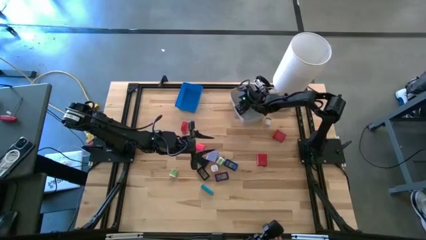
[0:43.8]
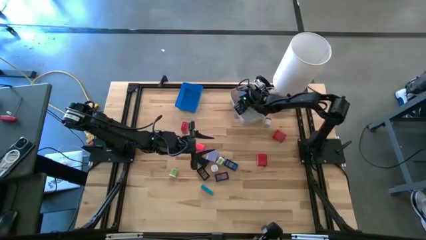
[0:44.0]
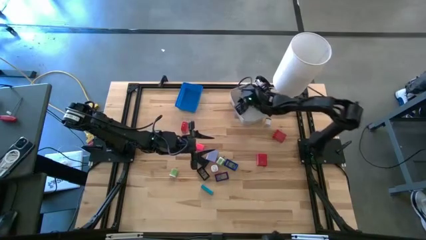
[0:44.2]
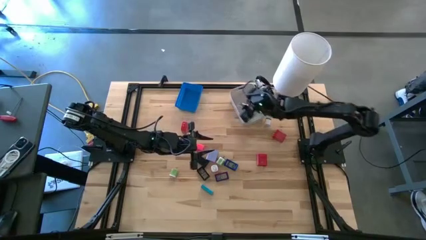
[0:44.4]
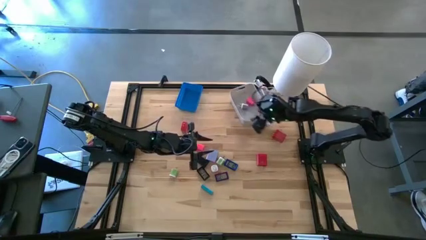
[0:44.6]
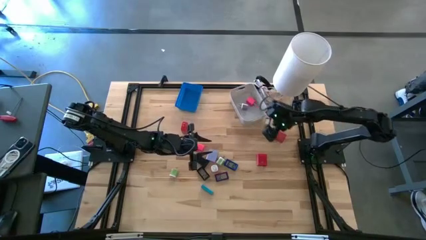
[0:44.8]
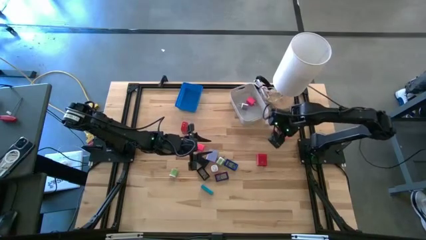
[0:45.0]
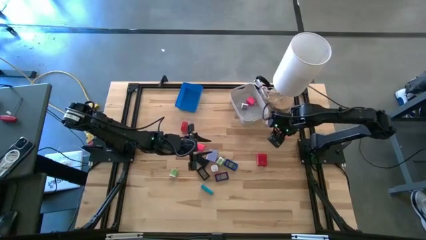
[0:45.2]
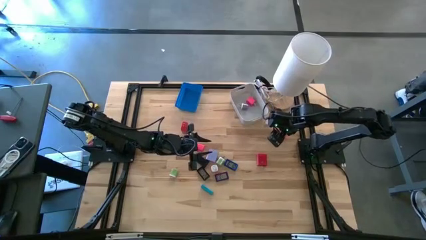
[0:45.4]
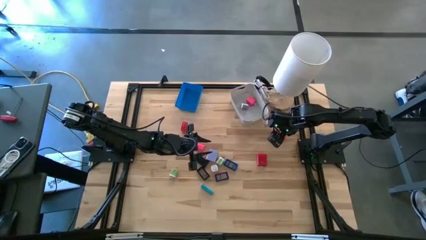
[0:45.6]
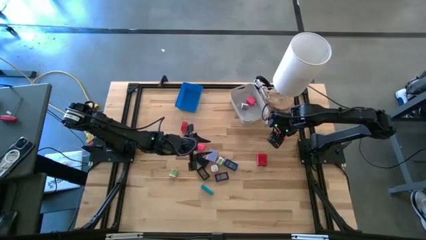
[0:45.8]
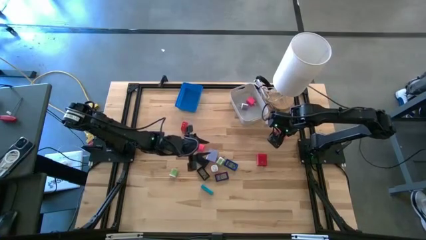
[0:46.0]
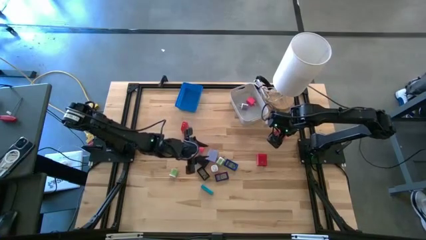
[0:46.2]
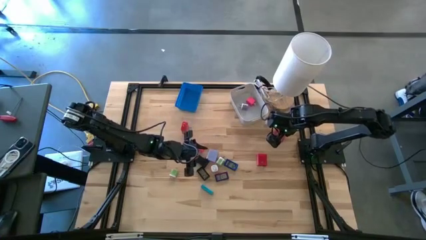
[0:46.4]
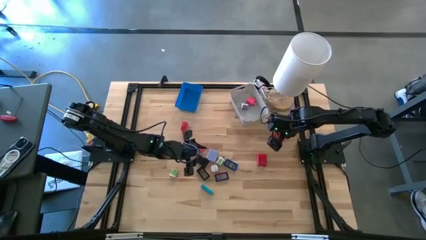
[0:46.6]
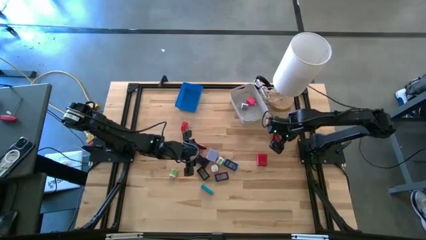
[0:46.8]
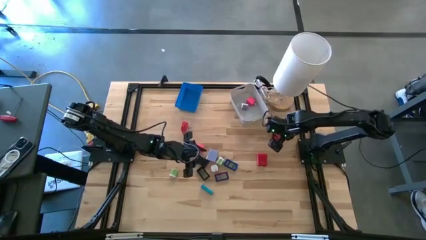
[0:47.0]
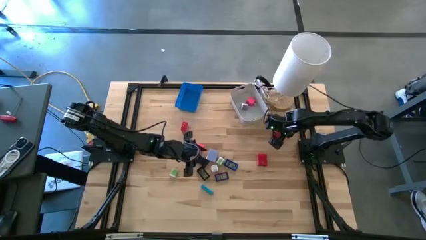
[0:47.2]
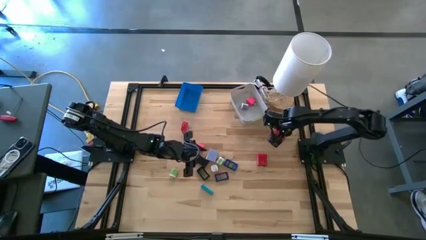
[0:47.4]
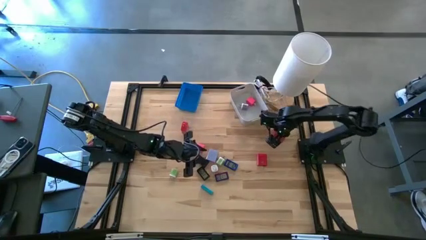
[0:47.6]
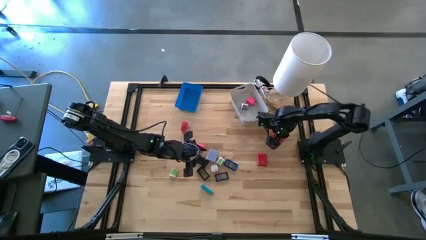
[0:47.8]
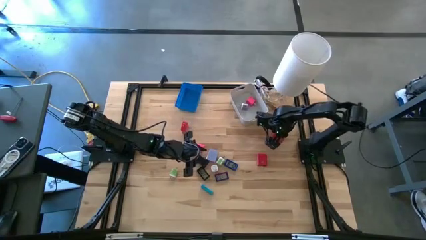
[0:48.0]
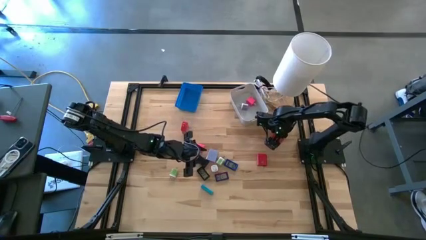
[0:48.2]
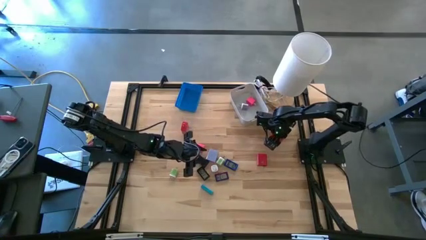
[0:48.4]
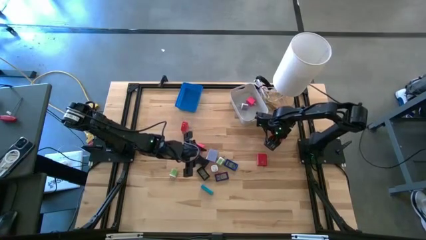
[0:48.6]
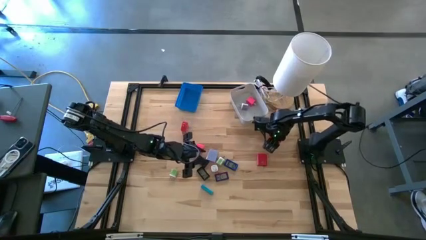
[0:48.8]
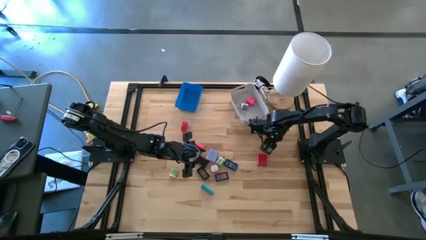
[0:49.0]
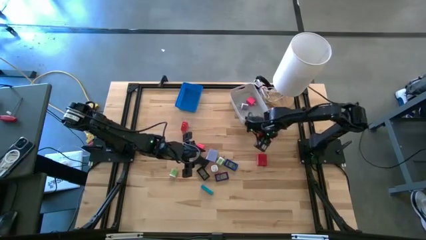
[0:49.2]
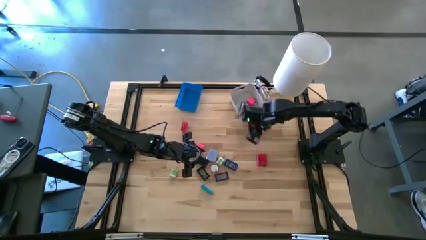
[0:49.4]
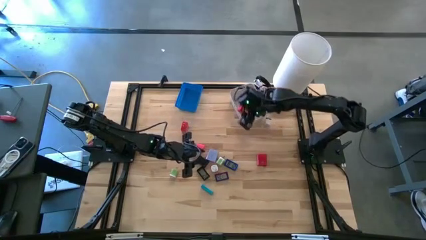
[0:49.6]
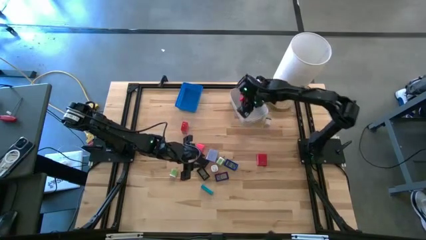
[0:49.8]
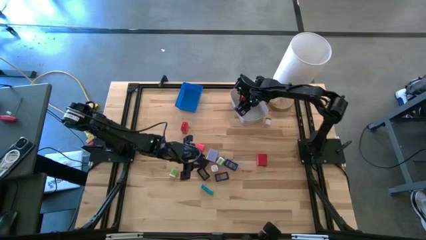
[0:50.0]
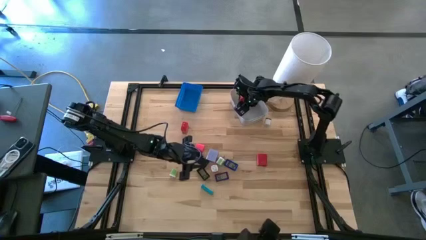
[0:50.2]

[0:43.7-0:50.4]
Task: Pick & Place Office items
Put the top right red charger adapter into the white bin

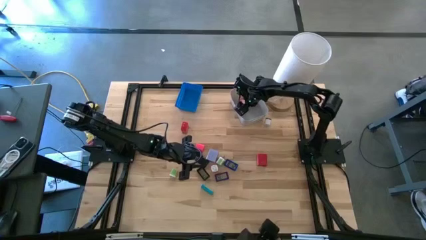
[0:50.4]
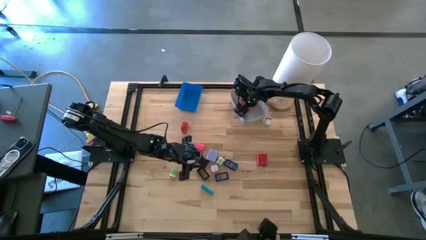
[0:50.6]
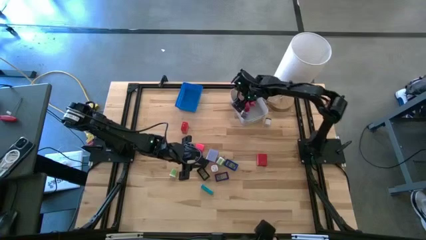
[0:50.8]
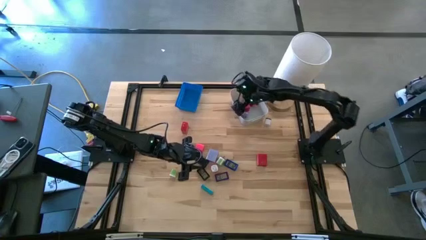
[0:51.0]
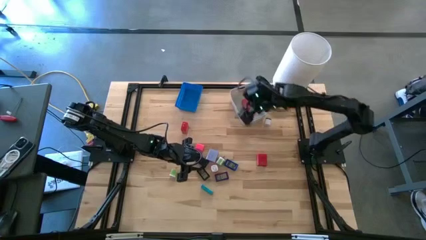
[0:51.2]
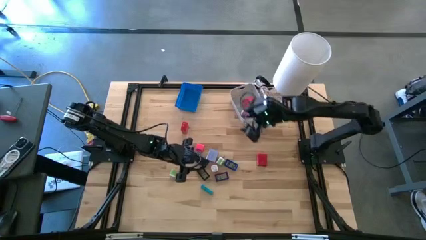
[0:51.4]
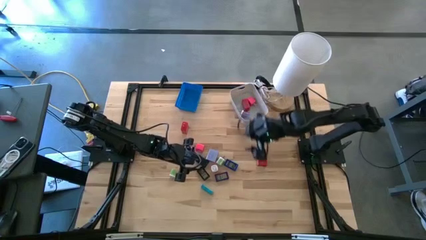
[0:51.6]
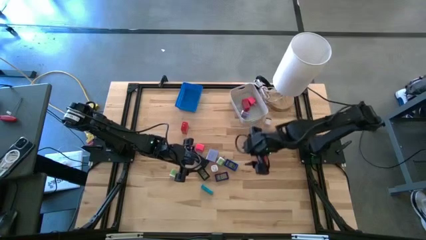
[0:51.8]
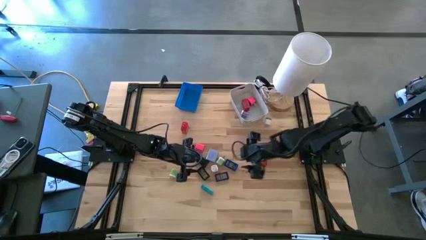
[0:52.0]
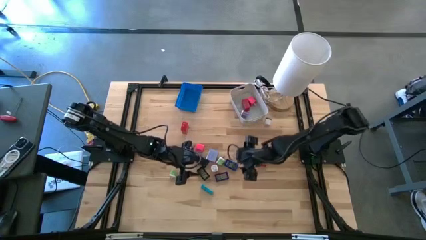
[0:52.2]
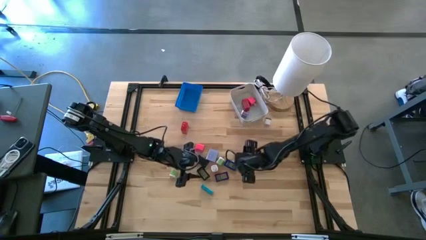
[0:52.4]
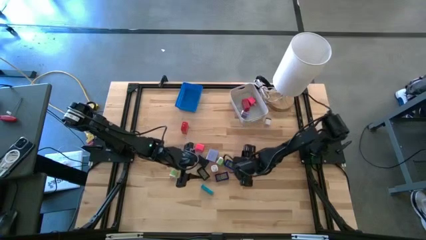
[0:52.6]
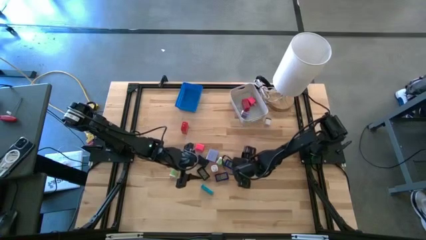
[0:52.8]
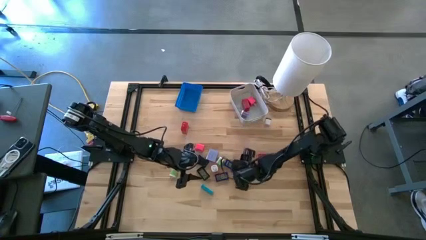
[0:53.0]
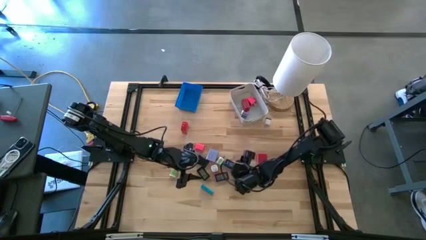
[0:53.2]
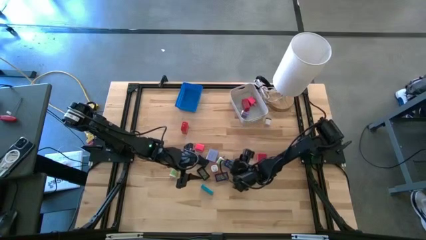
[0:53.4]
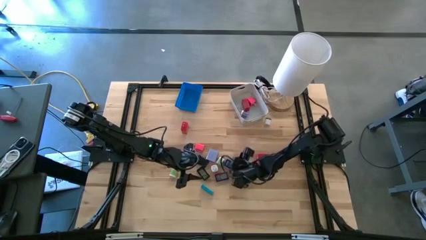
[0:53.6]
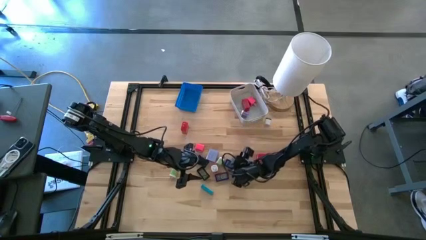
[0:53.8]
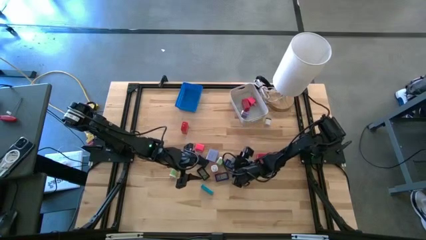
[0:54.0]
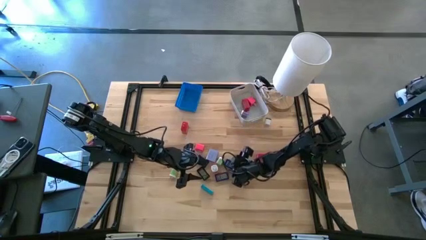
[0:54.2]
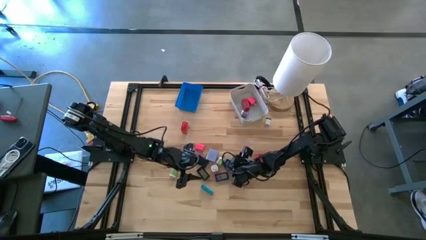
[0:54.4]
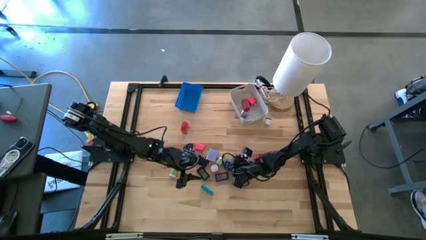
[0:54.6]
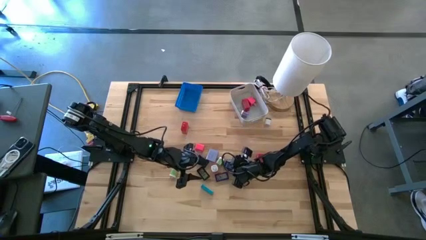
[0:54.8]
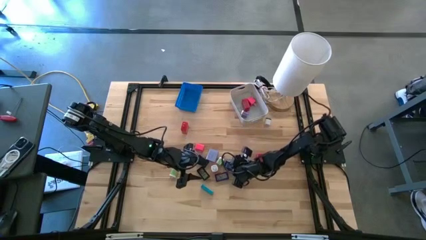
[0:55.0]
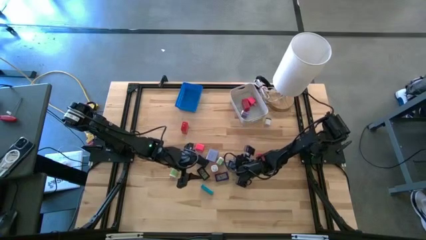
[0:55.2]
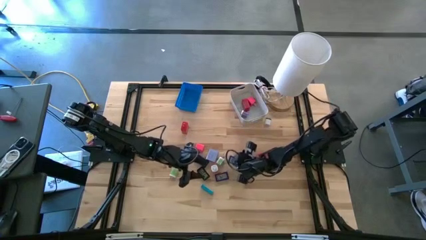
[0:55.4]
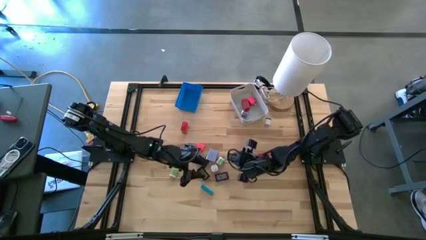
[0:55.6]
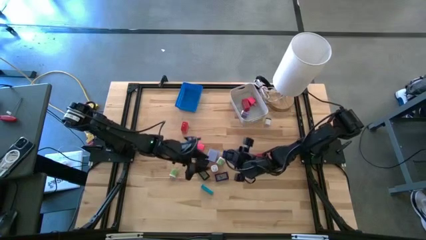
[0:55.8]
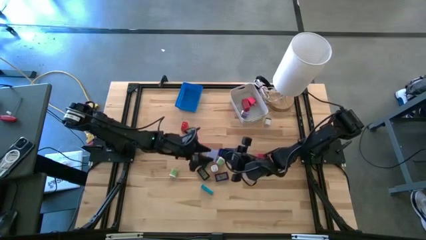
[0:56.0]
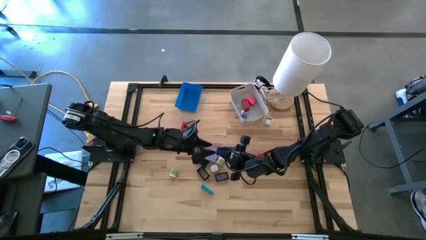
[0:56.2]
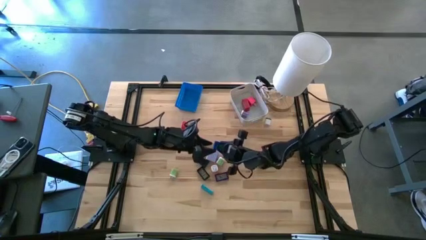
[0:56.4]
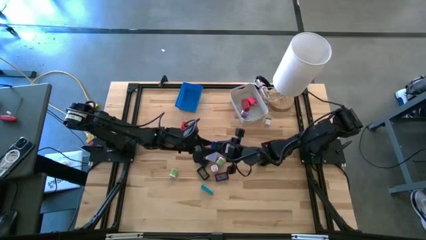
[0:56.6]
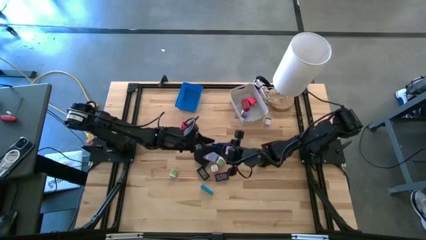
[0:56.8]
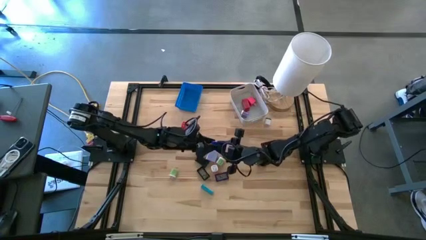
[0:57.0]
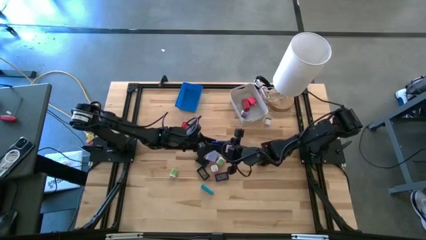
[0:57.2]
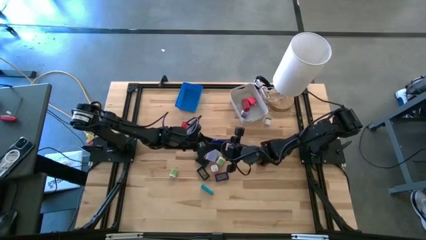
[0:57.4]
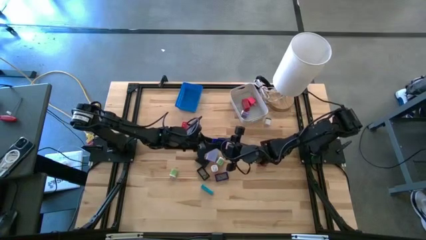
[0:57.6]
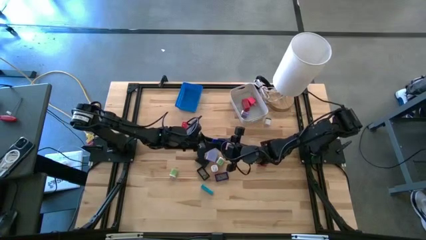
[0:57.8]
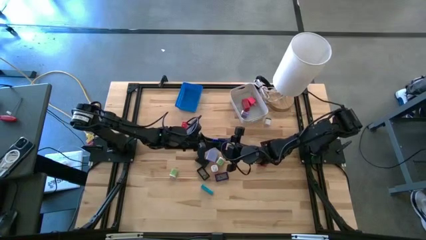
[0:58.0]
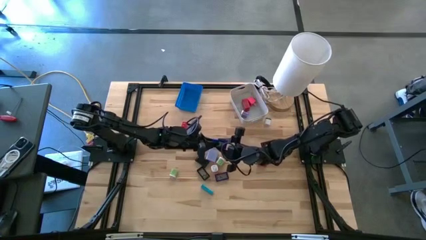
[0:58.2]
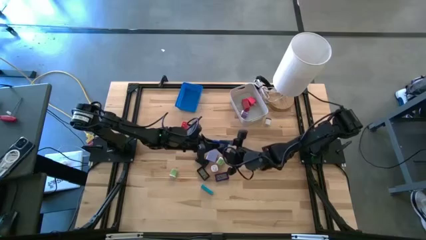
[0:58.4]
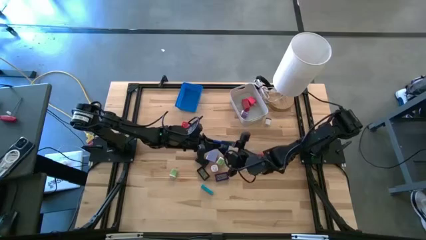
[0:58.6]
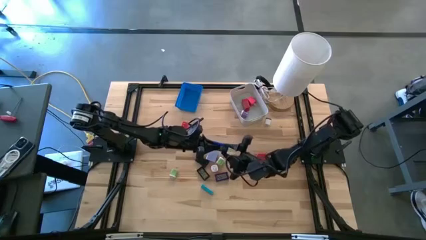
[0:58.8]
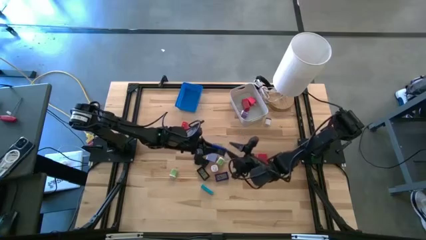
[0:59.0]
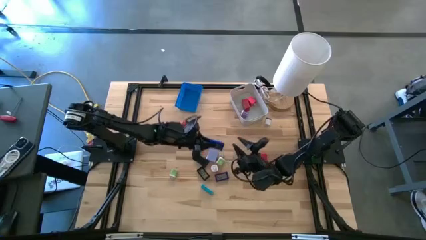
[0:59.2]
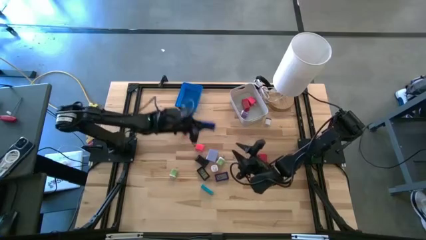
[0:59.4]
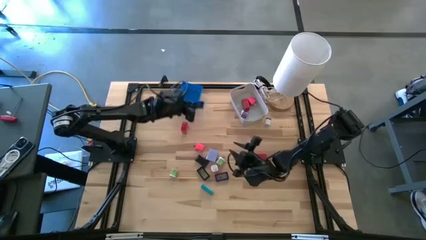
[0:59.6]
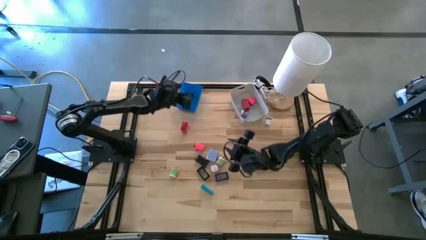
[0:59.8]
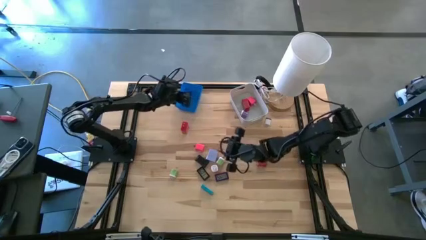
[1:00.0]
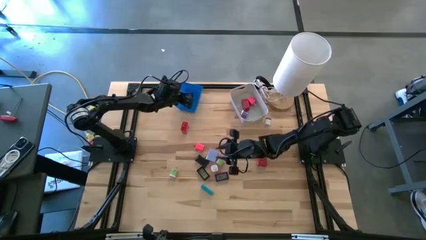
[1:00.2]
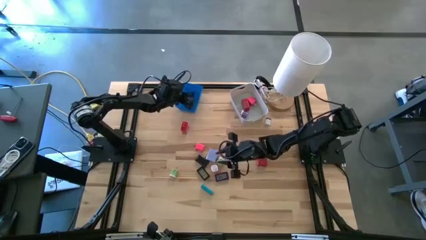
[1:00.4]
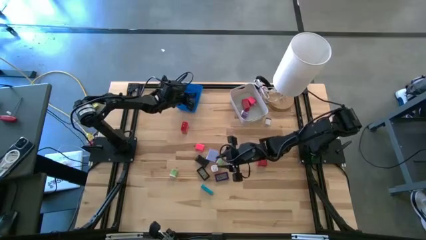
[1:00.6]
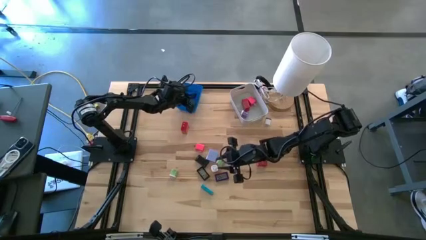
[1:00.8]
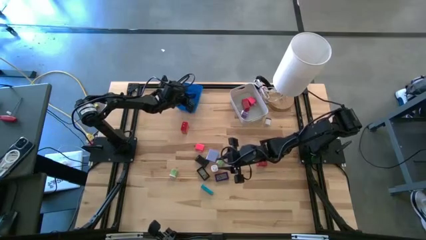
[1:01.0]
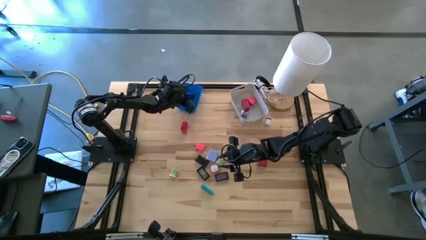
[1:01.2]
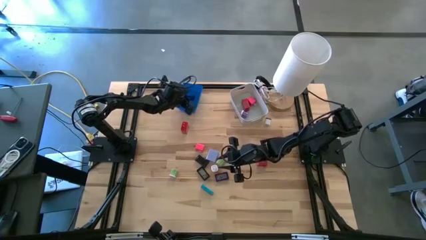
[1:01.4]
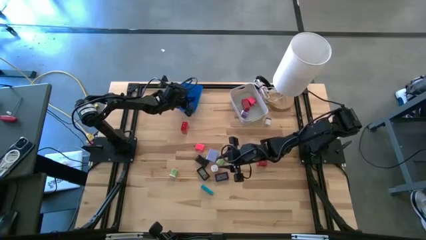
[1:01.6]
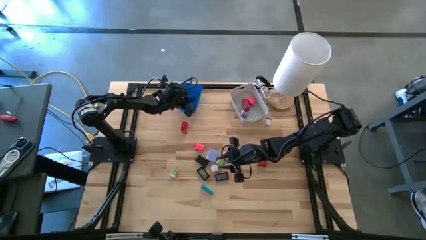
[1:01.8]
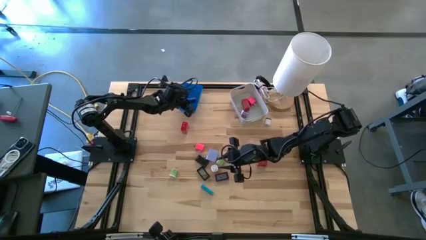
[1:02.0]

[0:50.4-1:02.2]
Put the blue digital timer into the blue bin
